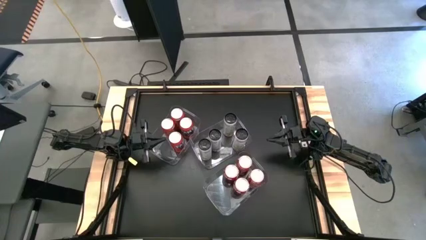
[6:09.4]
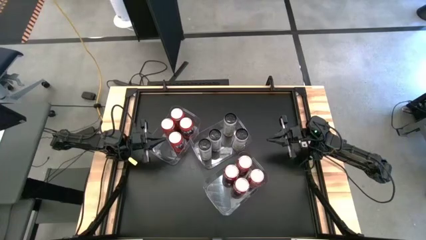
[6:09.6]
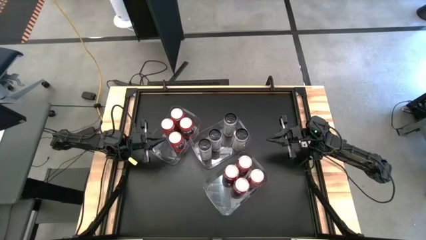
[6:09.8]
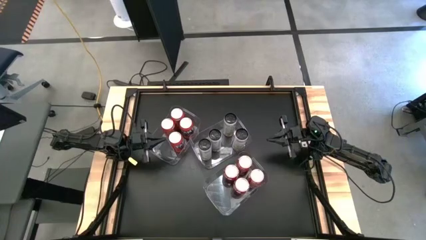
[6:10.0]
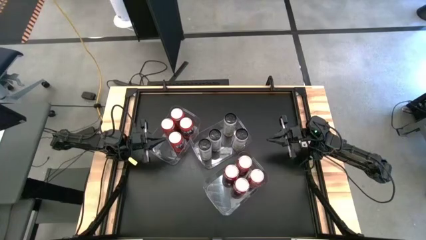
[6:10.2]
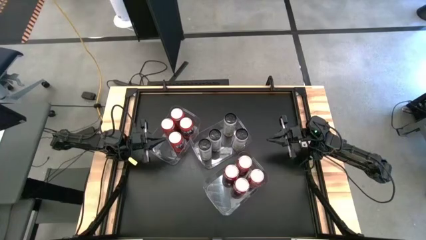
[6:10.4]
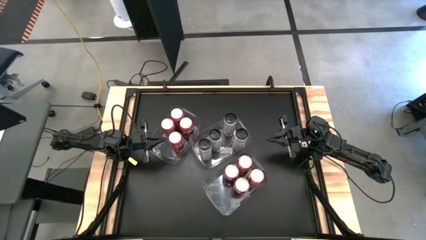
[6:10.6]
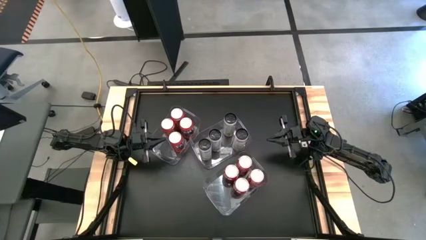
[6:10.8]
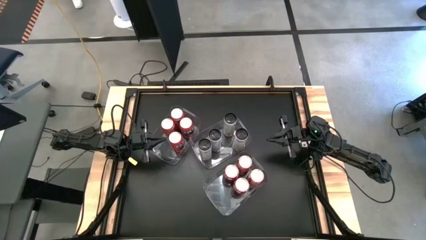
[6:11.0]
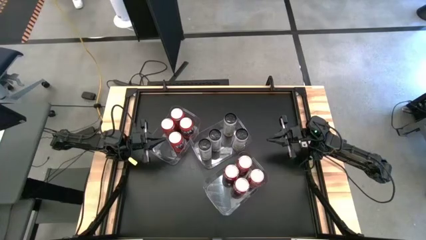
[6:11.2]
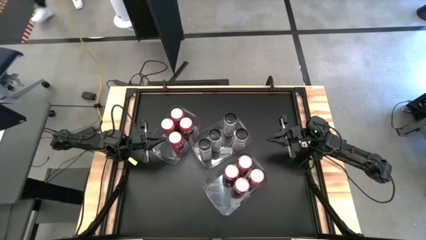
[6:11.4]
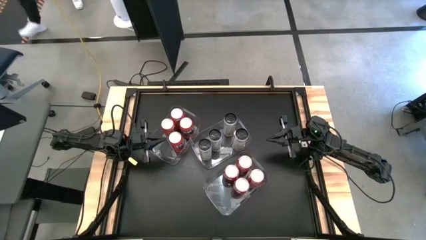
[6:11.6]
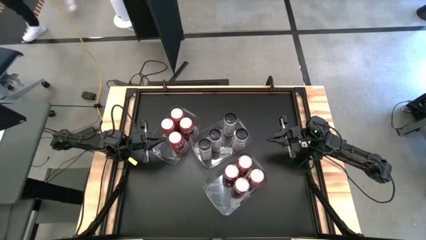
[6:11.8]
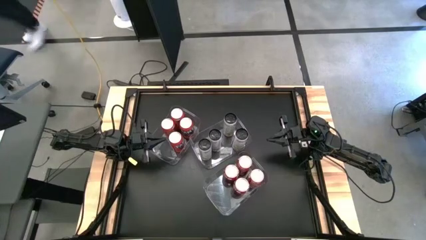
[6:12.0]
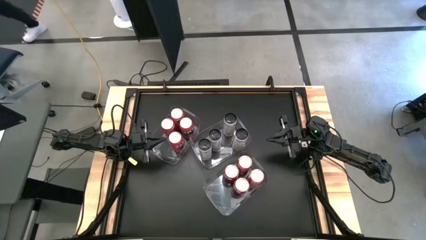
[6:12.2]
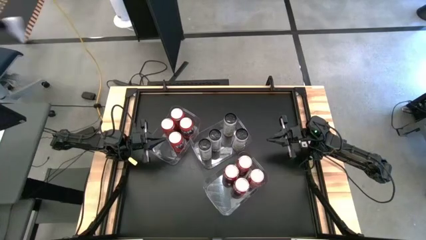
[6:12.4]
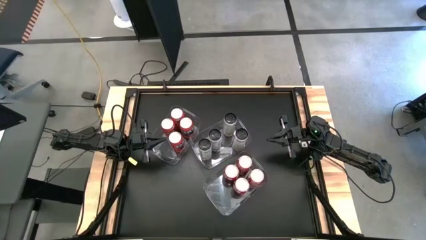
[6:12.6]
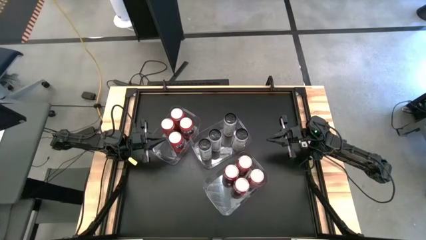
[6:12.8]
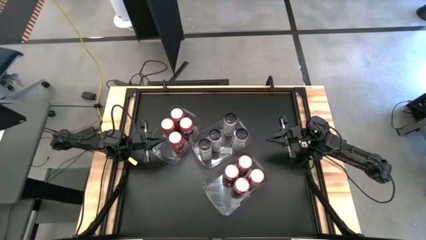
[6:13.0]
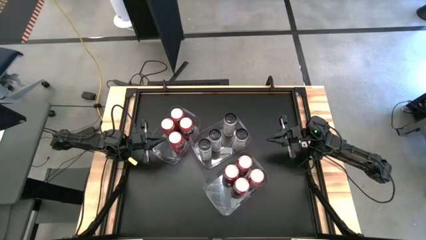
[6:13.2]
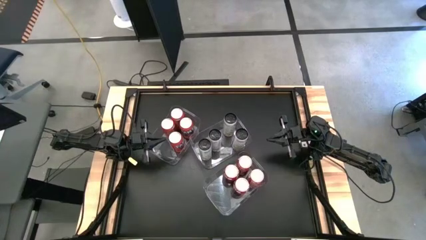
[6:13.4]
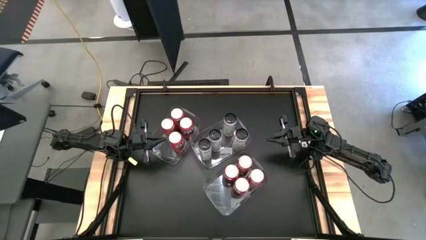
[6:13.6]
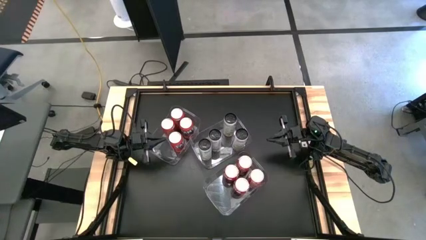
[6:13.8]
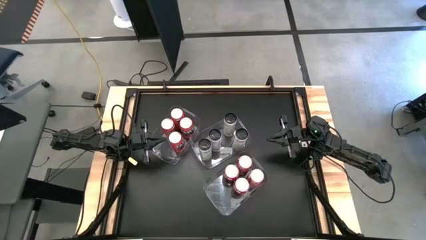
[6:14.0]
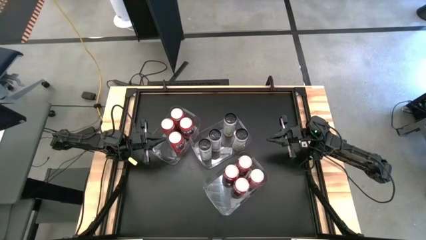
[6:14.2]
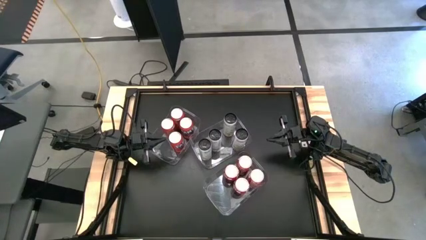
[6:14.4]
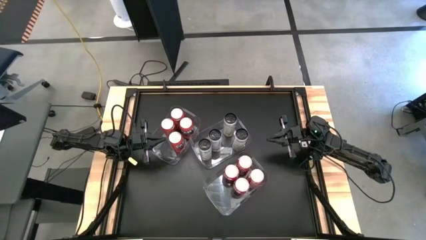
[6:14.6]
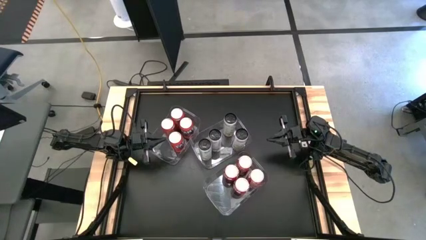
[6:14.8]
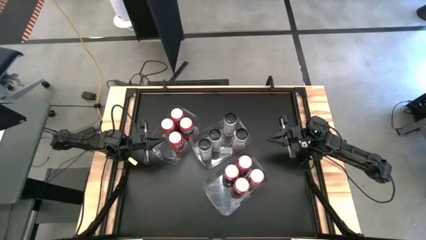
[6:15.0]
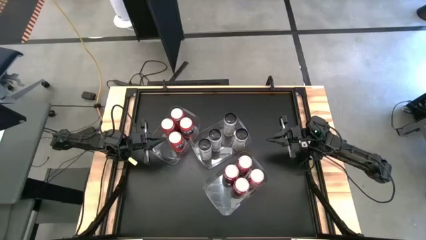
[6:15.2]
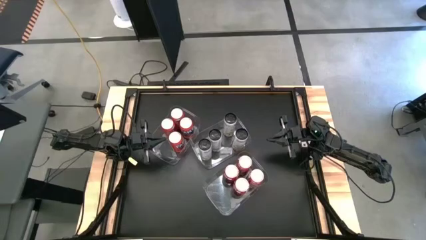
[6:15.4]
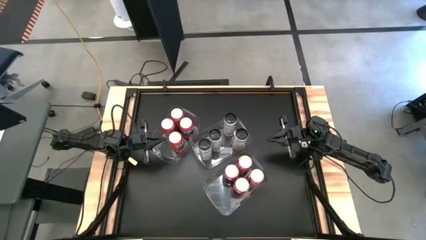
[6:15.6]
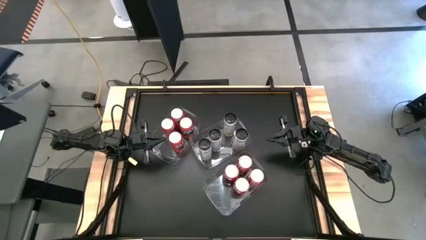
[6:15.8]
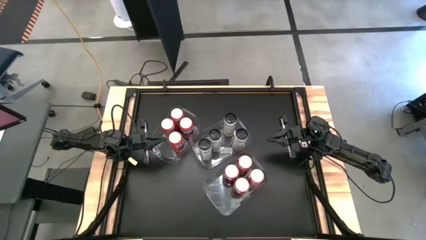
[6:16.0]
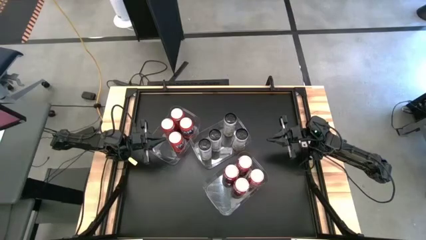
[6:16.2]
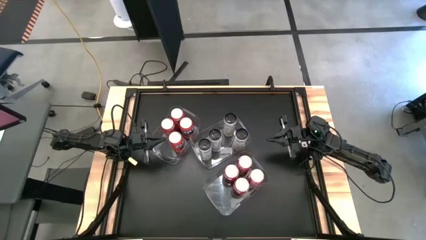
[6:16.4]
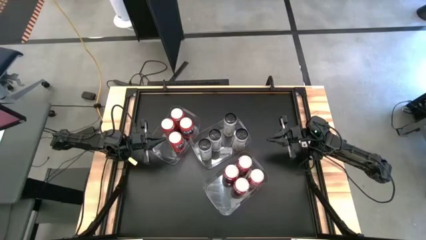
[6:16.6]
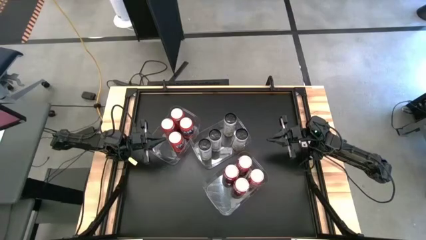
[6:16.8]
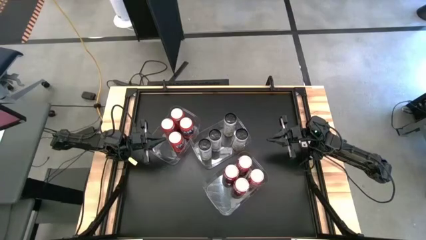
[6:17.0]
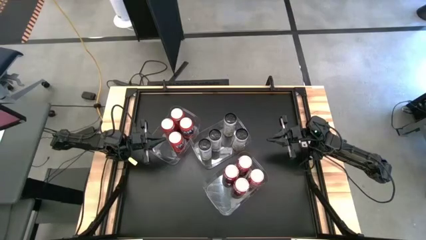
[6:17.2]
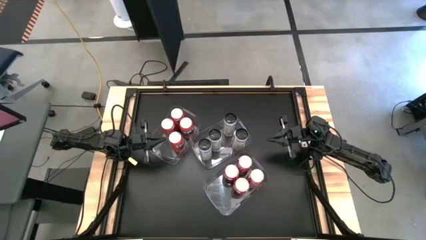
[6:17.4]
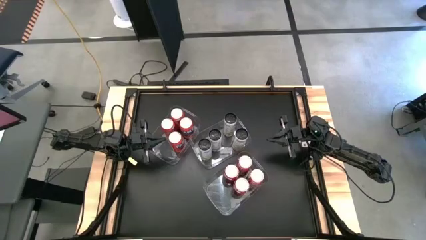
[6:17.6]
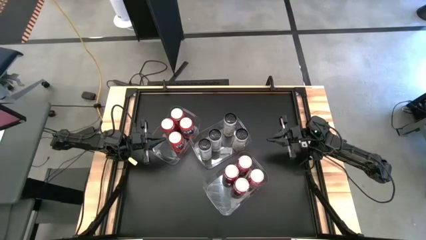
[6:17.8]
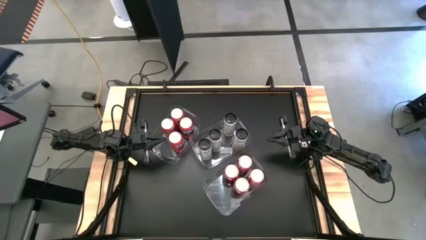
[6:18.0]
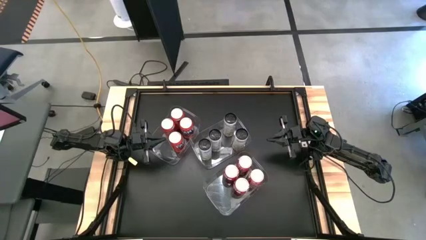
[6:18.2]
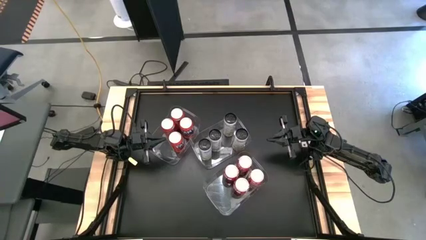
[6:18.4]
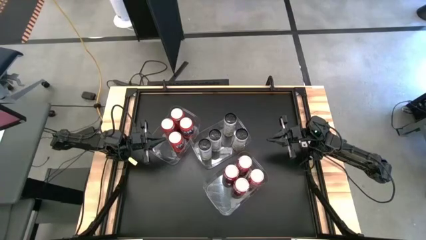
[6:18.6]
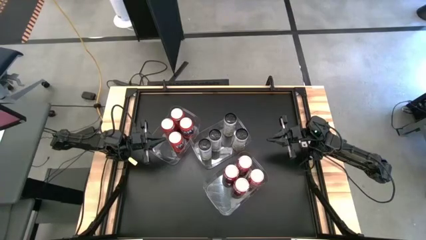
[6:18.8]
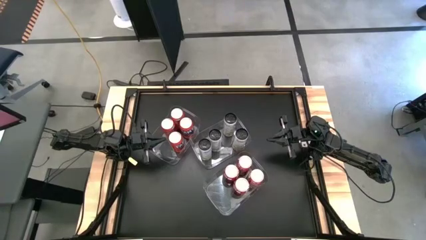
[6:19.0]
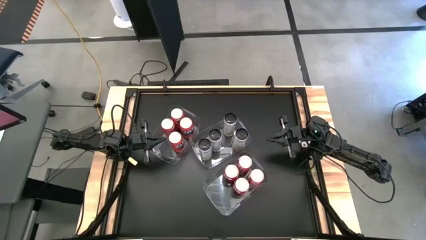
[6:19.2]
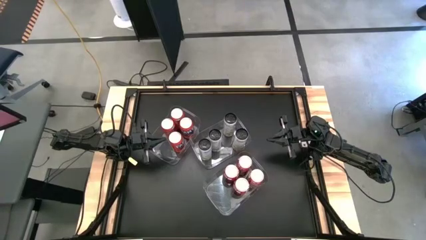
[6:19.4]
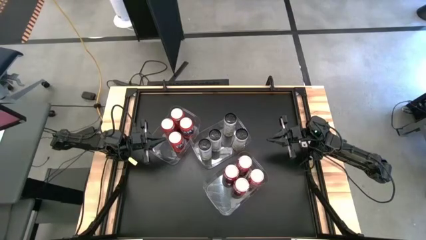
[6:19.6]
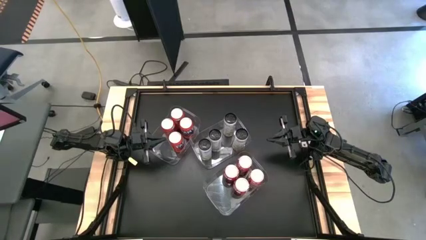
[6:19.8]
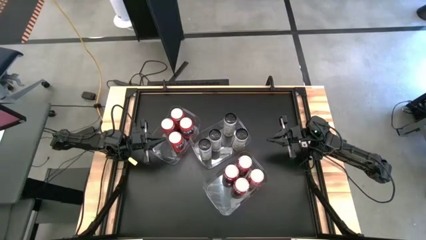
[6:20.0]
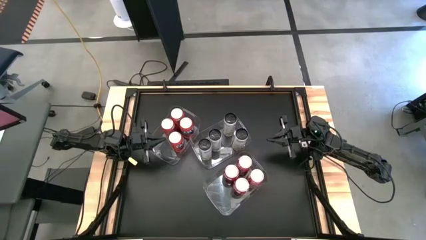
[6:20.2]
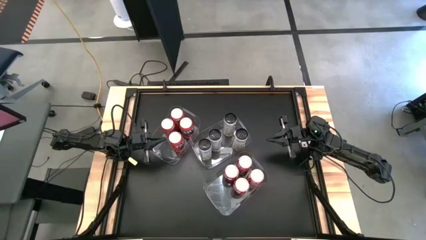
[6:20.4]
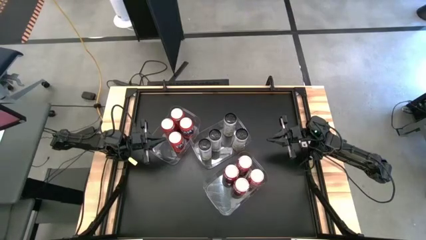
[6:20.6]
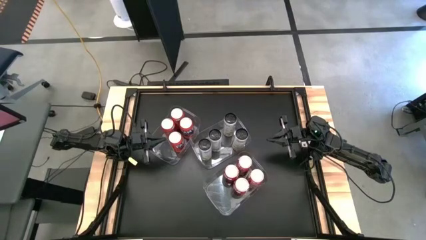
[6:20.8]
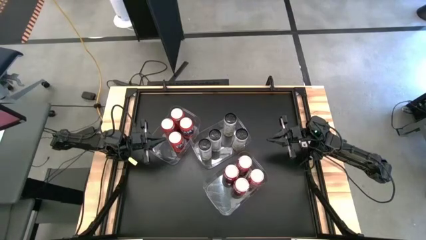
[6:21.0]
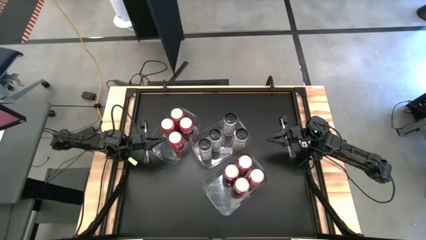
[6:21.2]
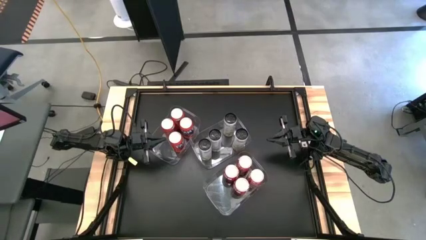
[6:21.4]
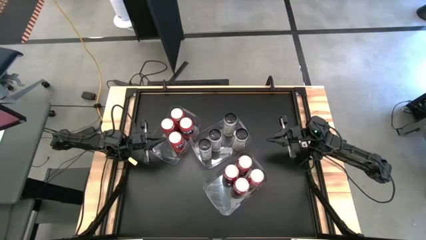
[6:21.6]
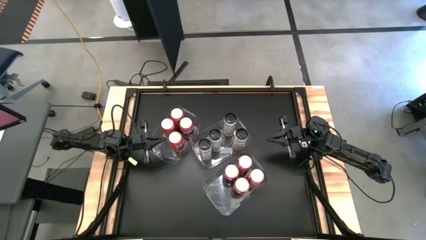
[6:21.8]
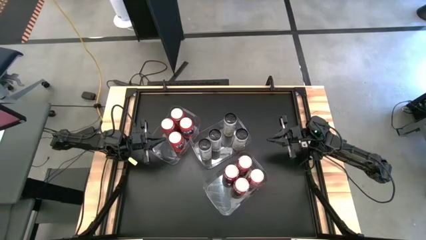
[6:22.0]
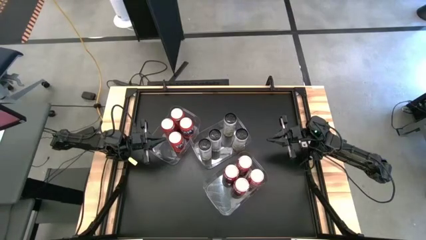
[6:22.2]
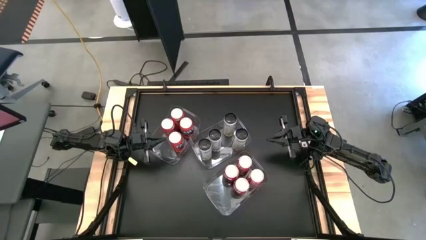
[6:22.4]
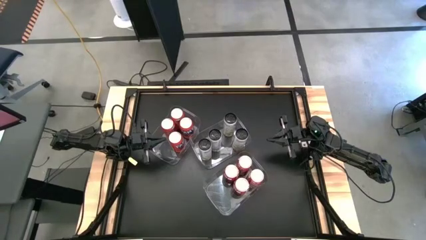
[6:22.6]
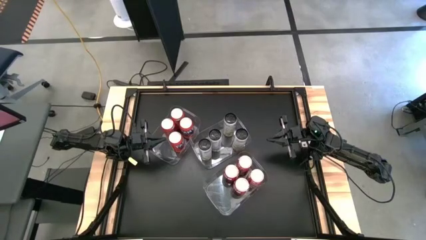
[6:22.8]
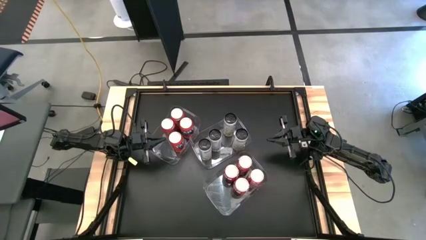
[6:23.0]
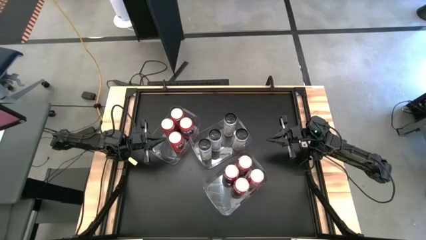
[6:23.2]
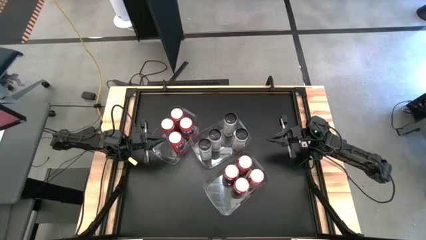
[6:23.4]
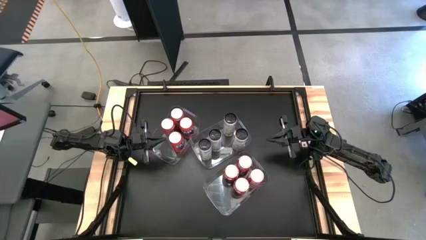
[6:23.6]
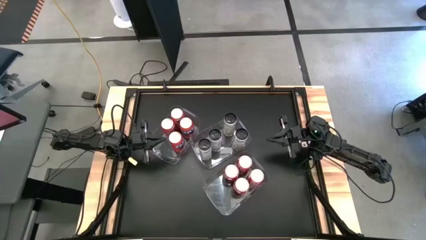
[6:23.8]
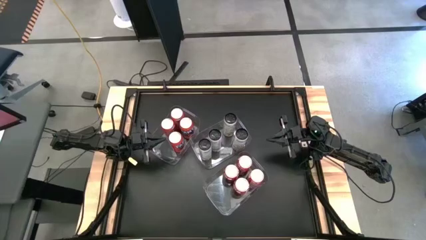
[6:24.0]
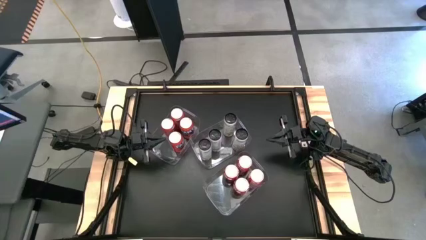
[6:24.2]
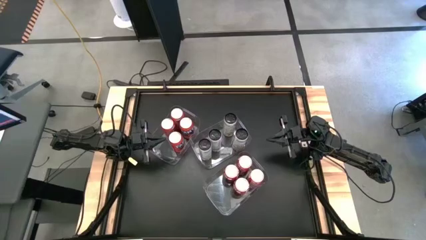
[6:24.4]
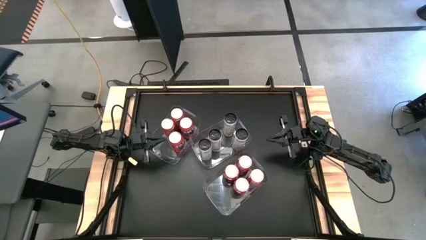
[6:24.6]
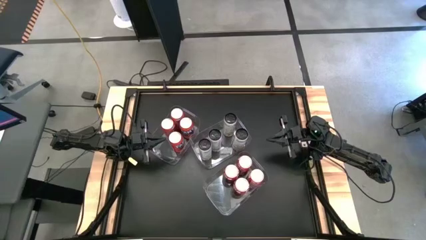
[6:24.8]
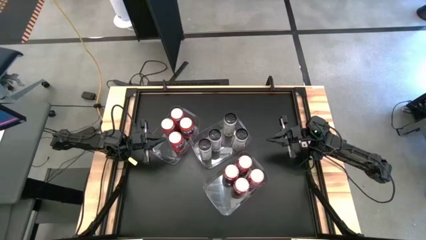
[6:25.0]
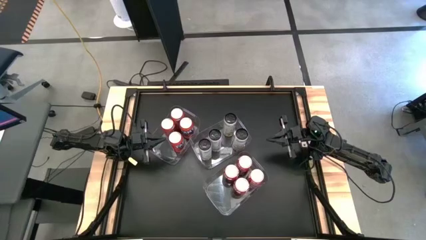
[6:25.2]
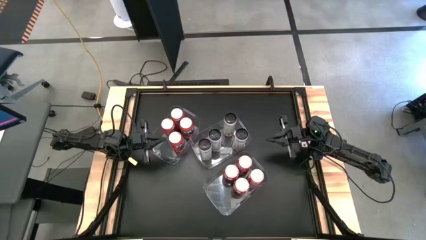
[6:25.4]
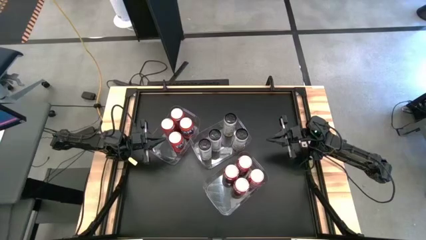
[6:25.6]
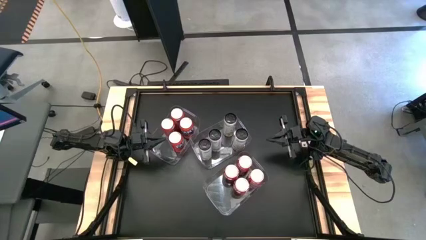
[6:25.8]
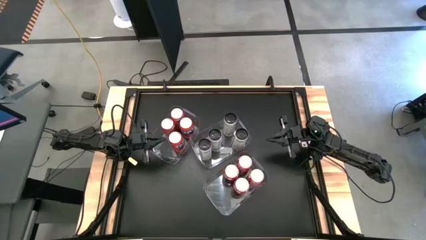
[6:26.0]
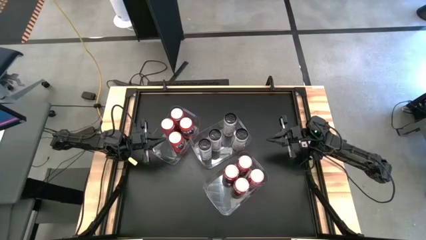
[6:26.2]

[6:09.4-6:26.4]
Task: Sort soda cans
Return to Home Position
